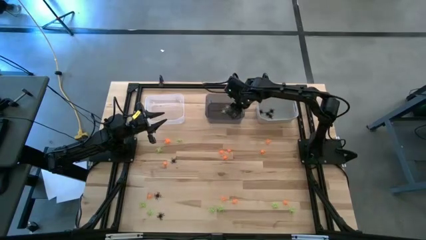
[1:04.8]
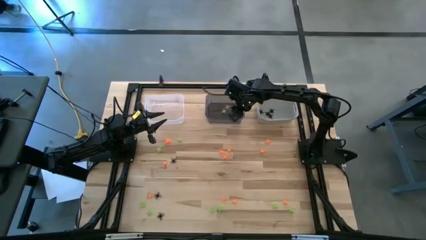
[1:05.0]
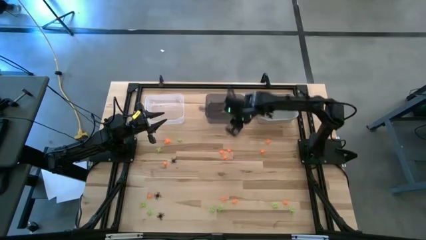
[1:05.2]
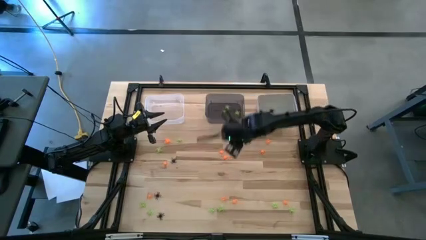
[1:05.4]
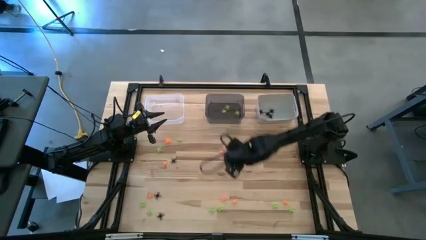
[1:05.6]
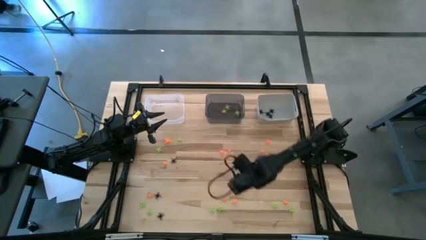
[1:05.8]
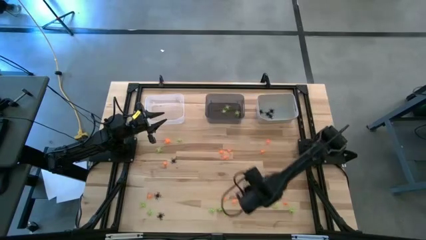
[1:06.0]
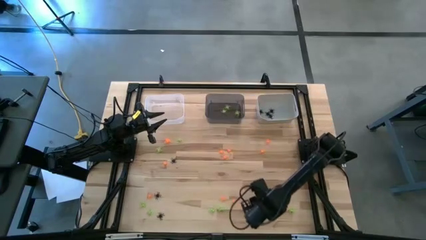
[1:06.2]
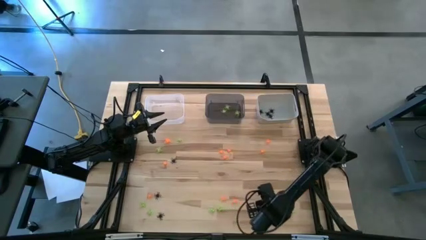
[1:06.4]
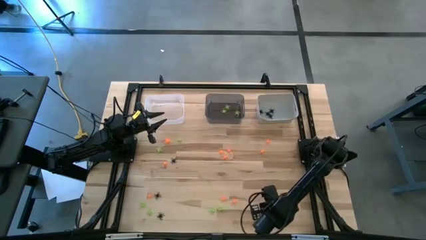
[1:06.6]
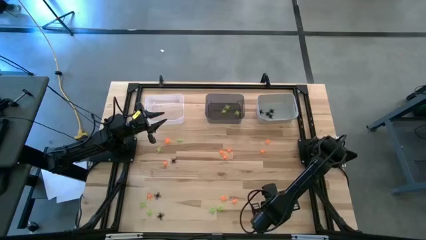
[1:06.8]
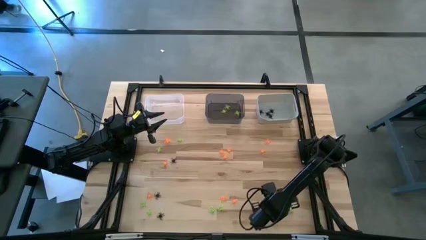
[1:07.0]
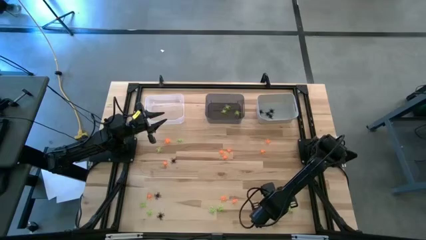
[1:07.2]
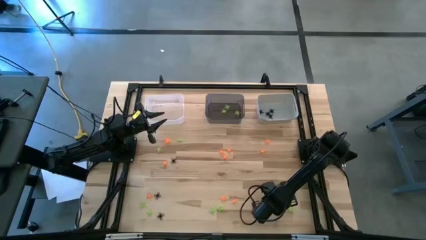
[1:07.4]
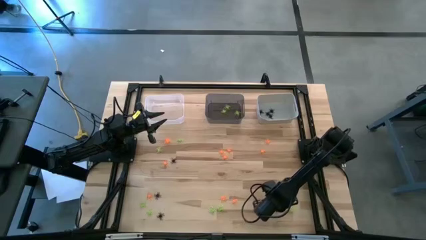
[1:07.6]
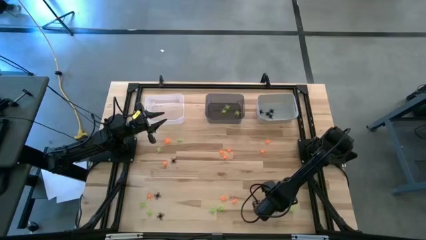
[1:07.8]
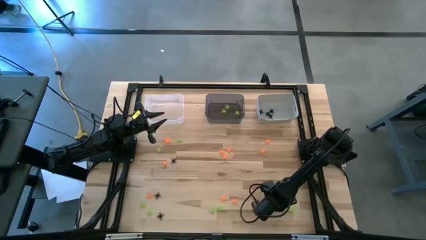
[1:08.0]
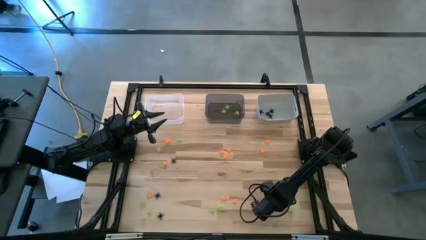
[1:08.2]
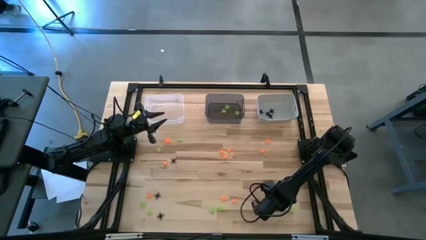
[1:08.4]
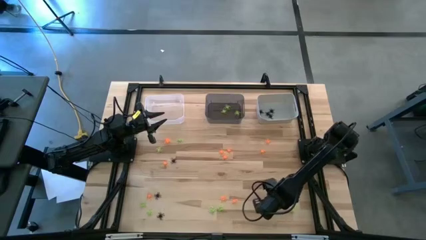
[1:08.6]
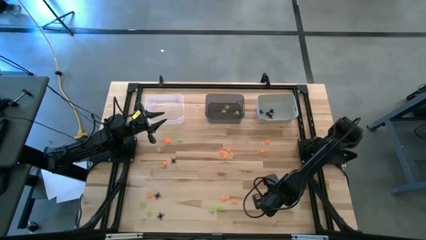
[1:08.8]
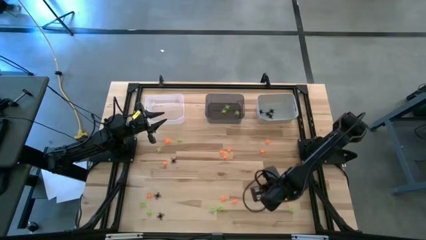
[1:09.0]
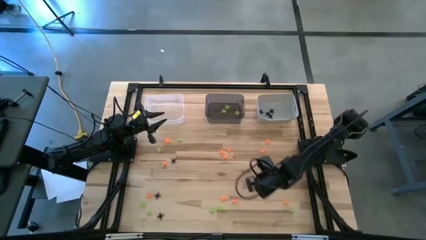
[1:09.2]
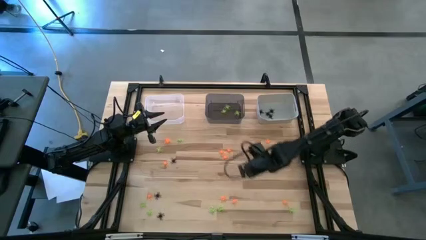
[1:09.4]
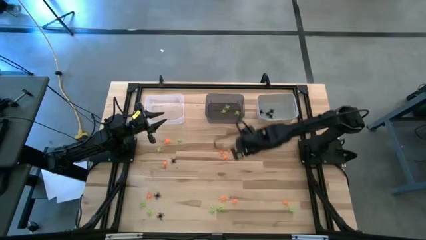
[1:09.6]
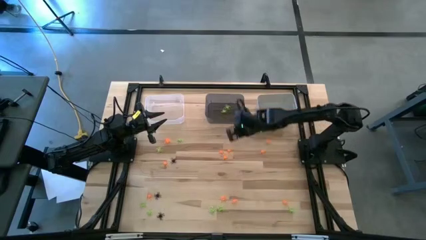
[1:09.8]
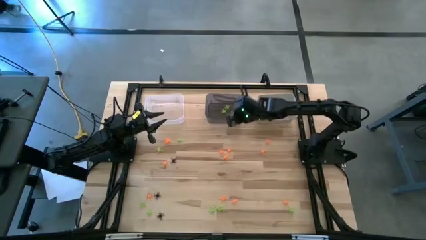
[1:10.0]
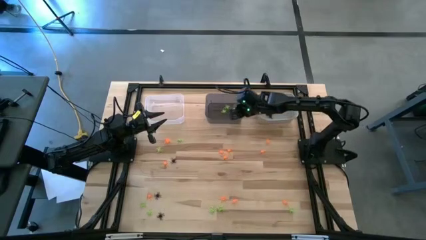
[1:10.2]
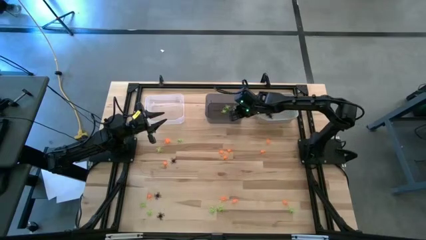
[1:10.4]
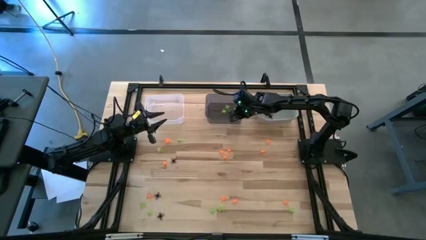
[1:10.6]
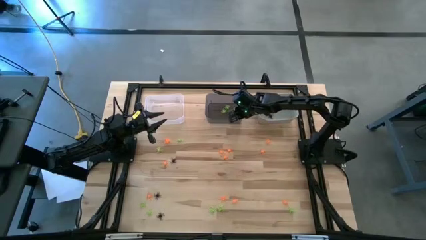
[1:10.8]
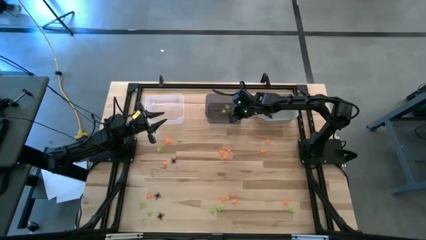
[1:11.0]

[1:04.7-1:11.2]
Task: Sort Halloween decoration
Put the green spider toy into the black bin

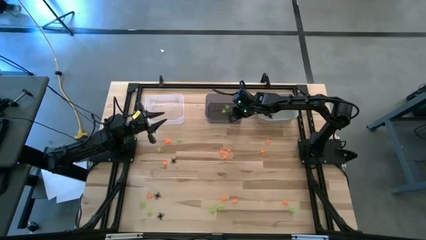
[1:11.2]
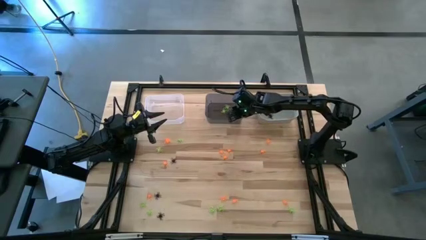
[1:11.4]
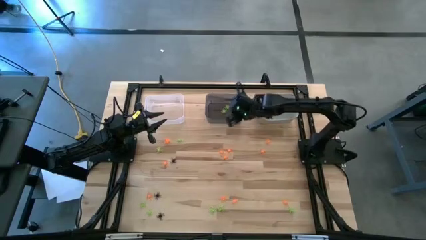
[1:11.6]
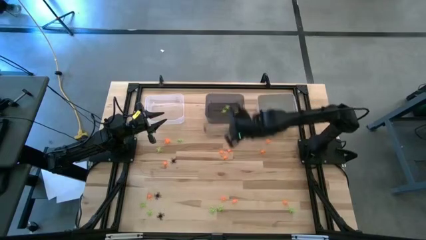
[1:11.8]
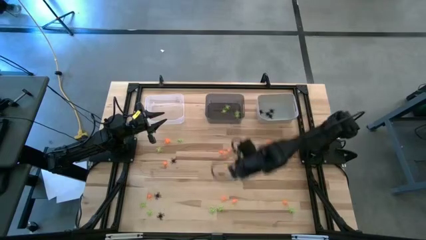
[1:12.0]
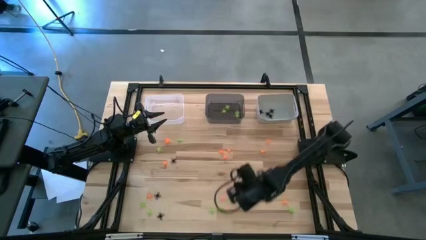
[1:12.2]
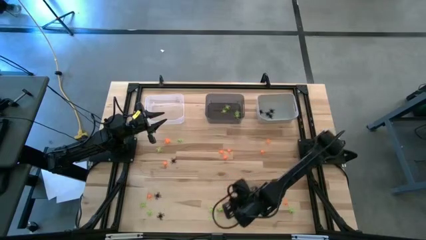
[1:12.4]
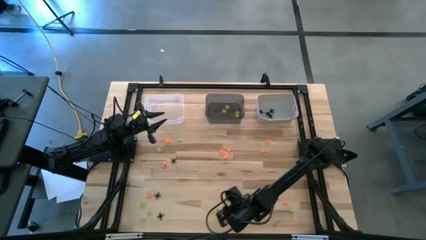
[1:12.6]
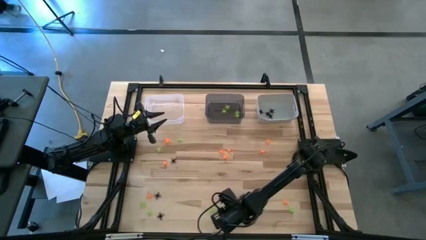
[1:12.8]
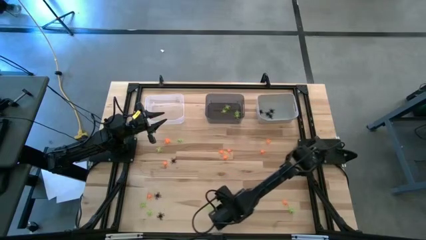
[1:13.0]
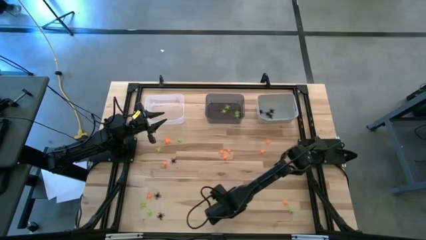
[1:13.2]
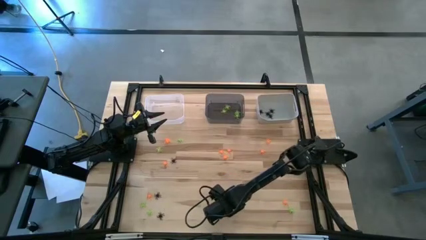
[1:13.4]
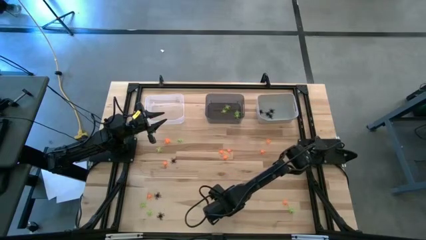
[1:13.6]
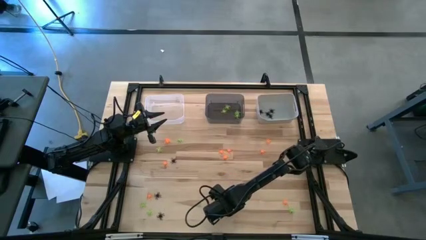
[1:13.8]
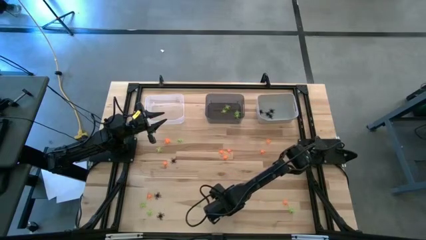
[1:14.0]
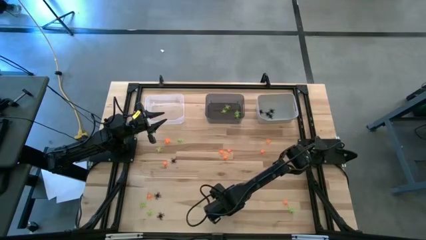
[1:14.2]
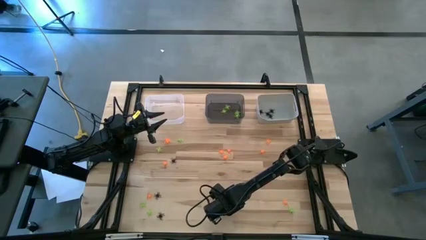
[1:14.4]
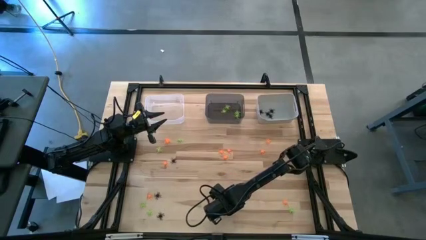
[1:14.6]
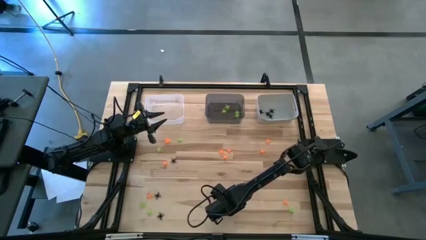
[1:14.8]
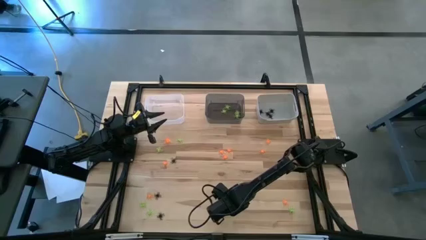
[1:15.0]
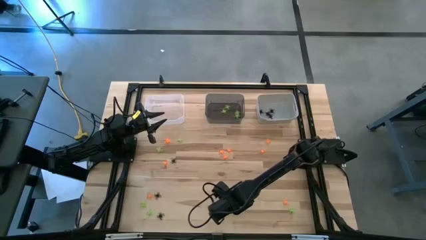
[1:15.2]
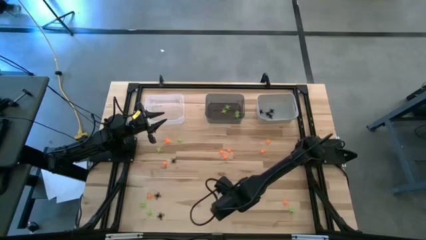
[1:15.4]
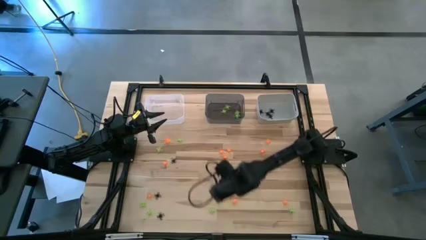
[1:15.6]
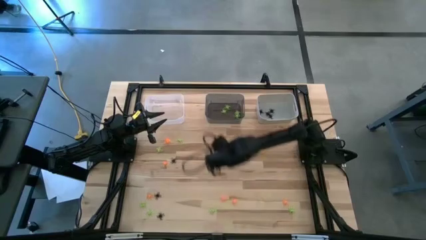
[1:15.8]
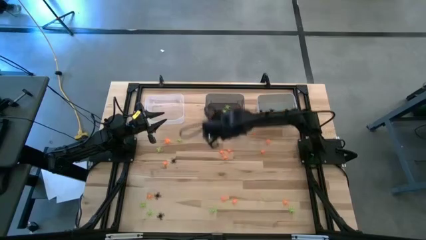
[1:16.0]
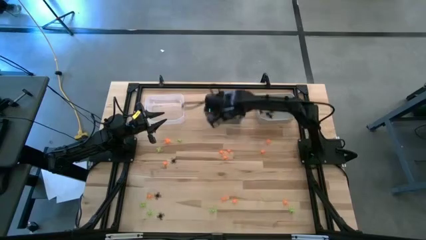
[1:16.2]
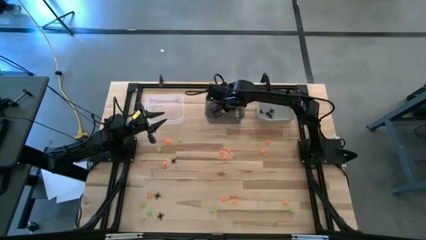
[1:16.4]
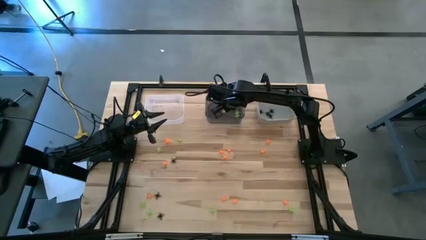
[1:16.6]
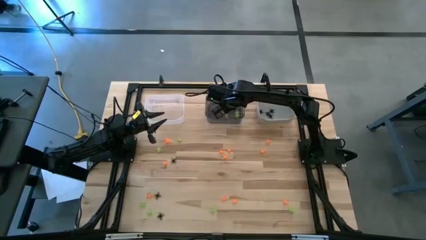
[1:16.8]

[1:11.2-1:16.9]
Put the green spider toy into the black bin

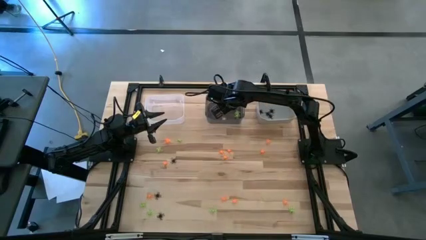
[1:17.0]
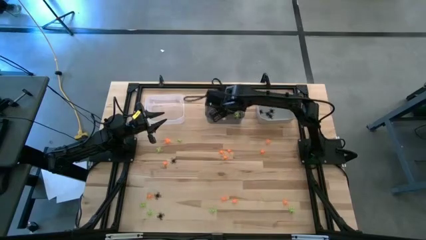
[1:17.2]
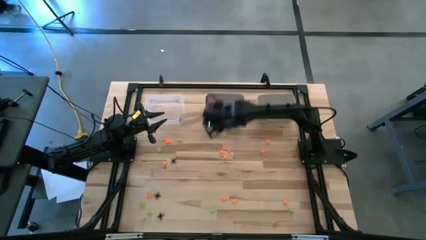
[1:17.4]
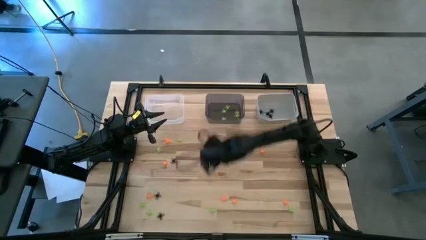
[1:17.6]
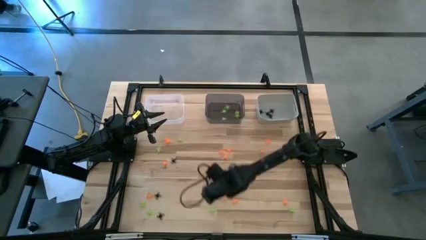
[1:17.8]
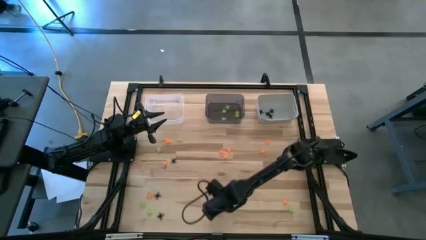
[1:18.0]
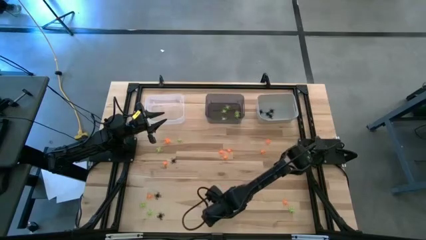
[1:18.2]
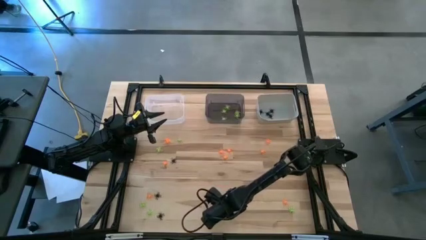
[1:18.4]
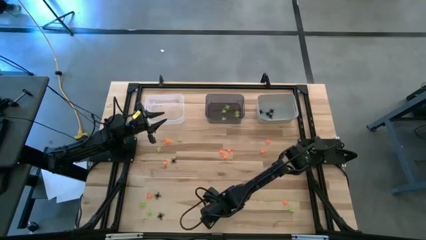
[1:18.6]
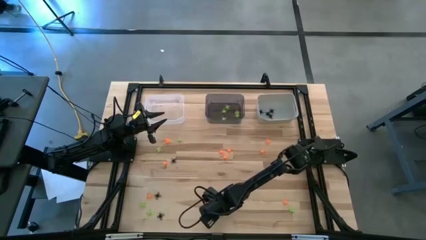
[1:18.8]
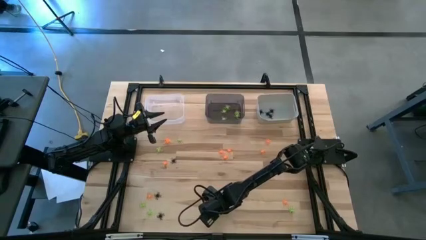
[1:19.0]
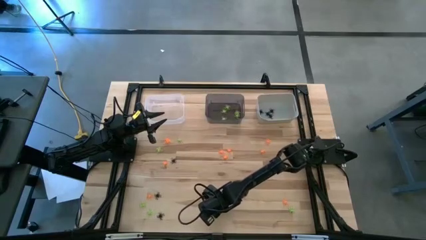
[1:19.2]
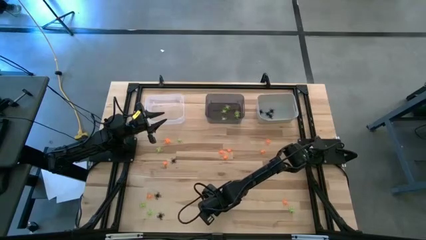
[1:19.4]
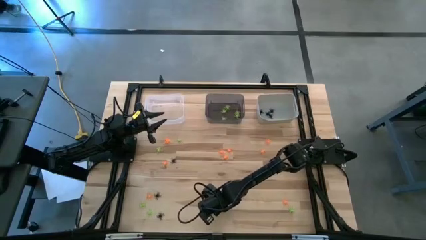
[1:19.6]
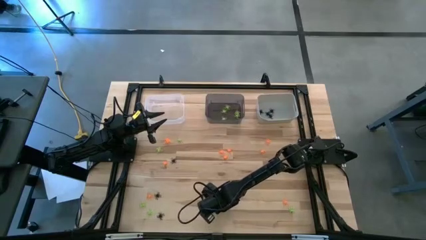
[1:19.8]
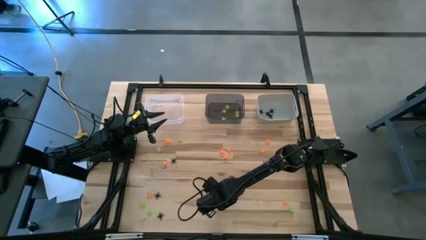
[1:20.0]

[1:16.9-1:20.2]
Put the green spider toy into the black bin

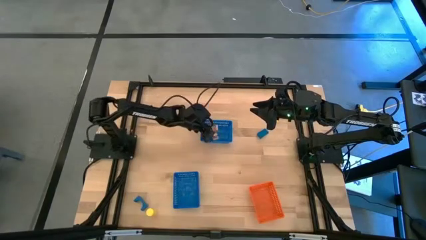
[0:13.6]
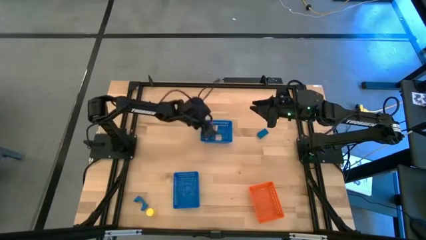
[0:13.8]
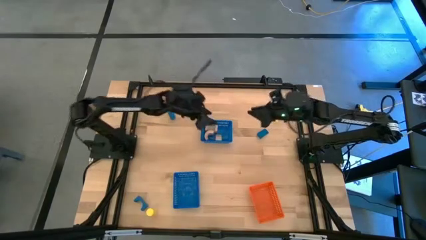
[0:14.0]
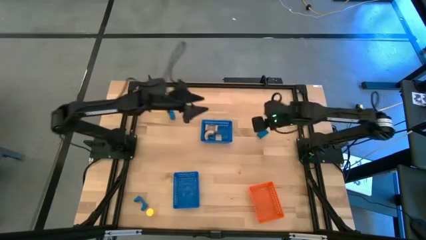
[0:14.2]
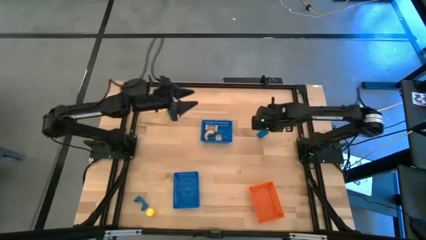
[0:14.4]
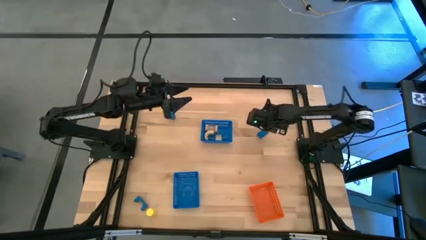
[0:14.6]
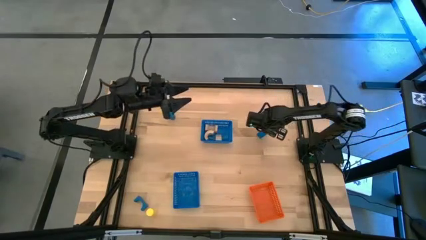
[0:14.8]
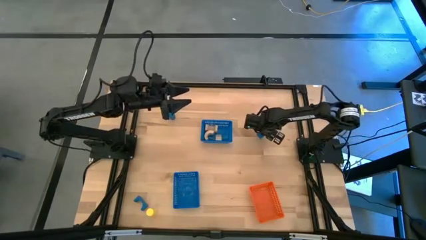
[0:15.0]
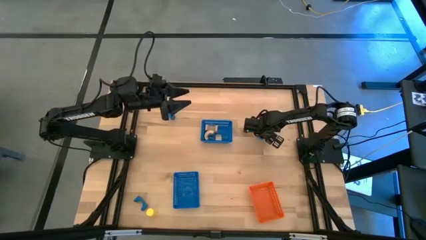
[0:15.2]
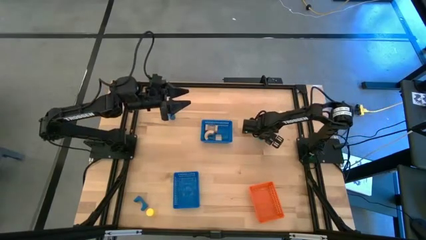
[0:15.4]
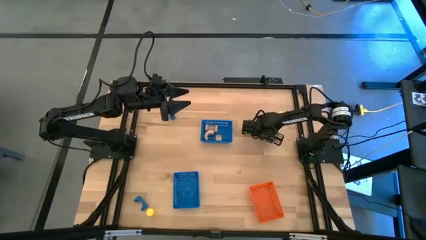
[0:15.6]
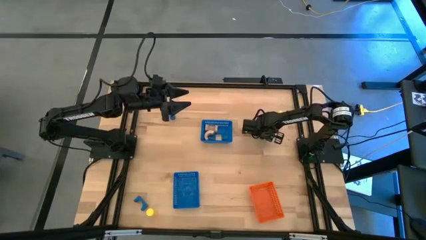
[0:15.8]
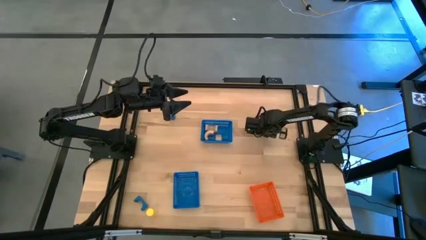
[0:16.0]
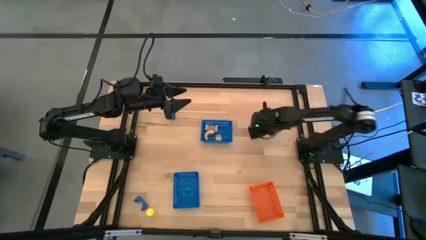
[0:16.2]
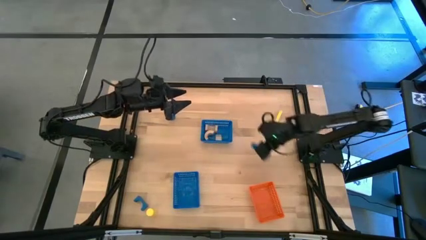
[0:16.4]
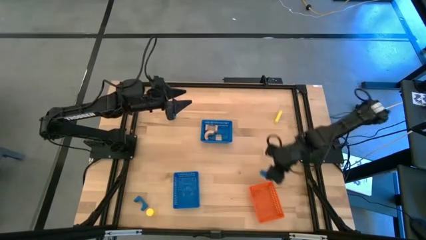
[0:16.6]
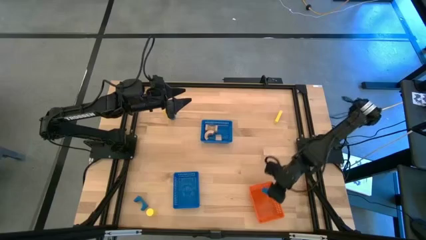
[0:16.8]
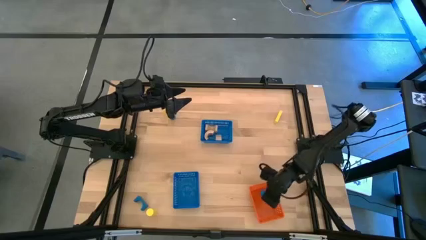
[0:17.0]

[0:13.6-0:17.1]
Task: Sort & place blocks by color
Put the top right blue block into the orange basket
